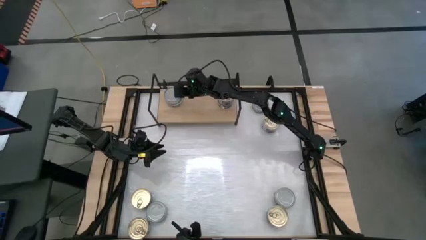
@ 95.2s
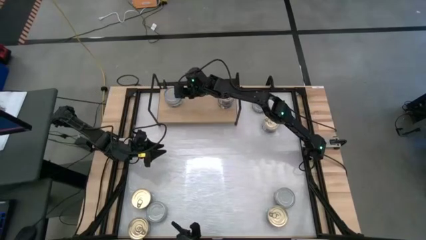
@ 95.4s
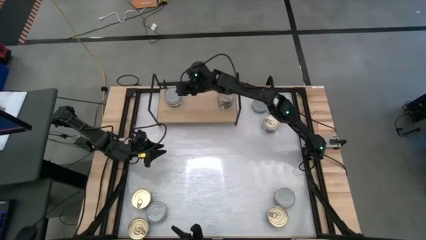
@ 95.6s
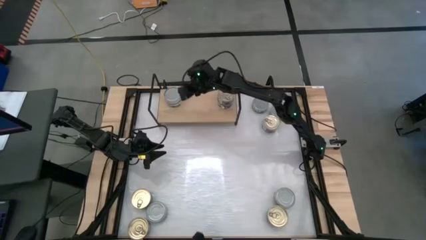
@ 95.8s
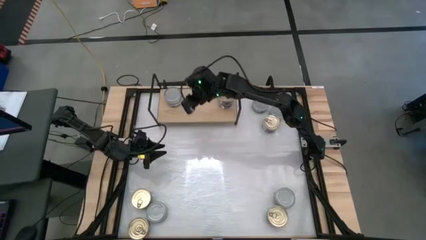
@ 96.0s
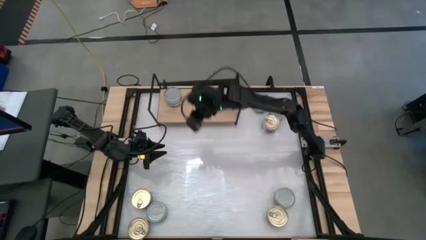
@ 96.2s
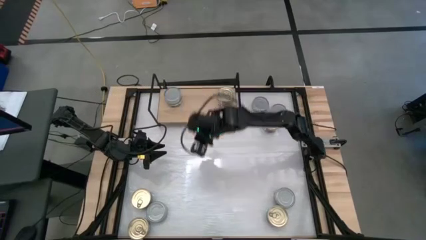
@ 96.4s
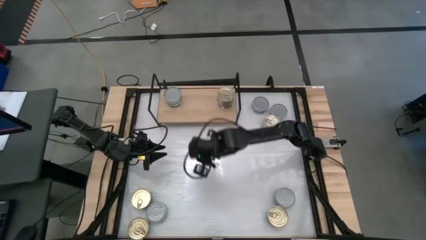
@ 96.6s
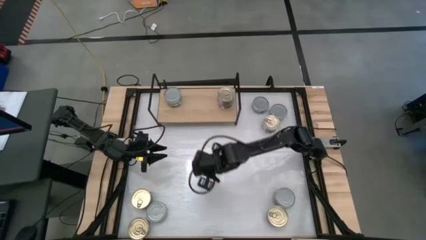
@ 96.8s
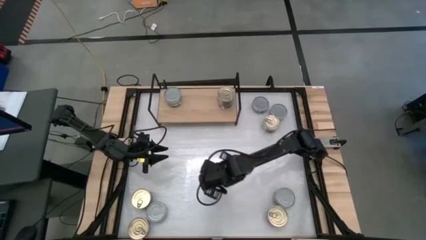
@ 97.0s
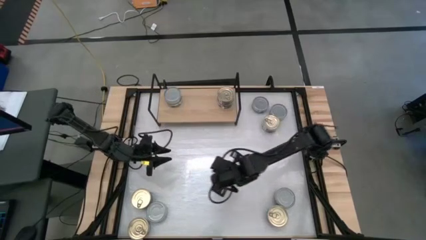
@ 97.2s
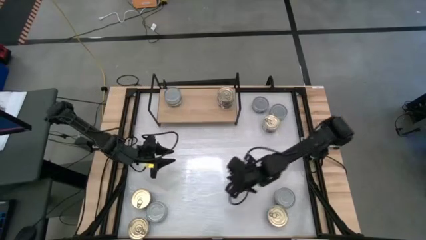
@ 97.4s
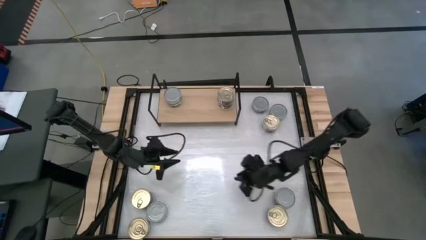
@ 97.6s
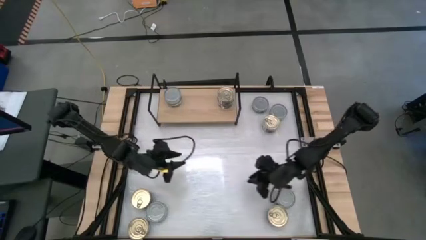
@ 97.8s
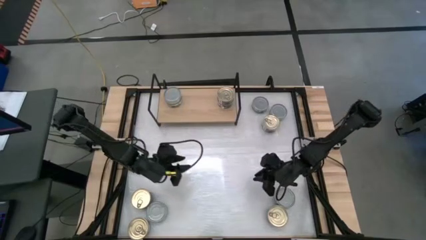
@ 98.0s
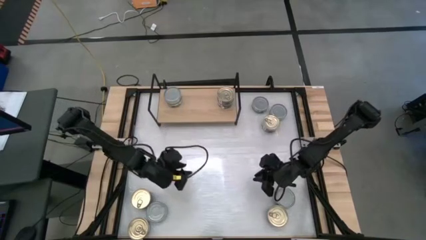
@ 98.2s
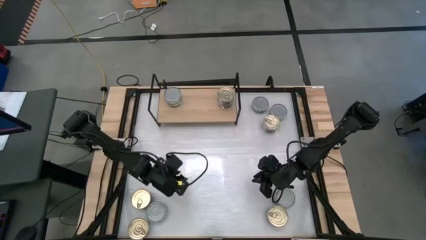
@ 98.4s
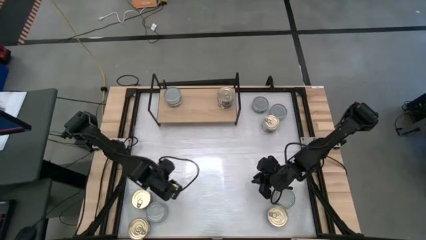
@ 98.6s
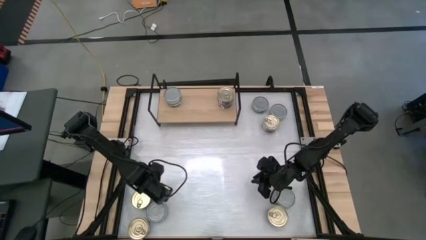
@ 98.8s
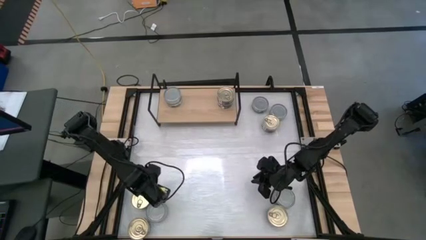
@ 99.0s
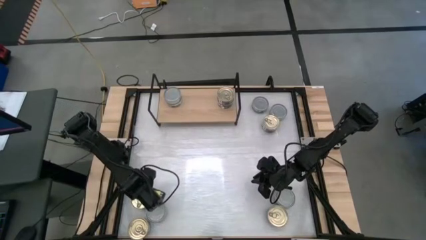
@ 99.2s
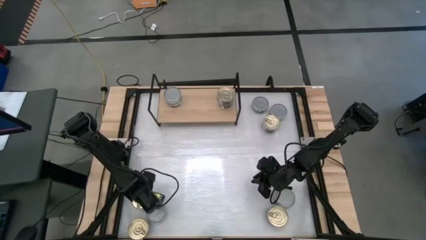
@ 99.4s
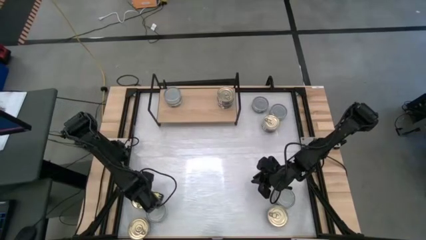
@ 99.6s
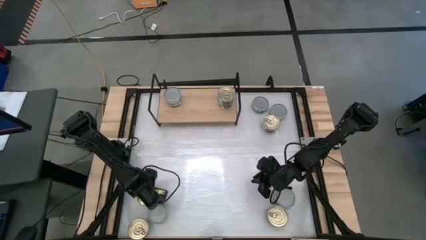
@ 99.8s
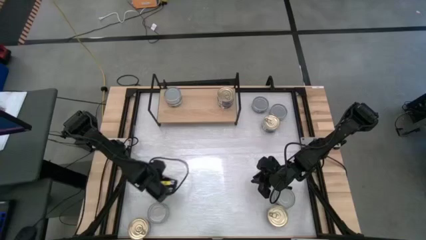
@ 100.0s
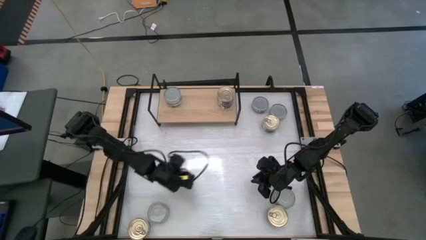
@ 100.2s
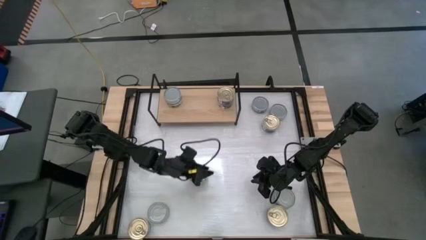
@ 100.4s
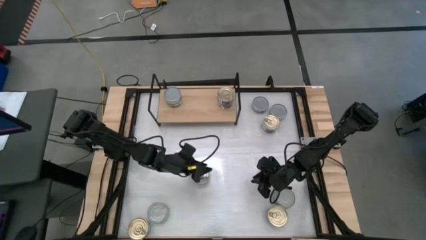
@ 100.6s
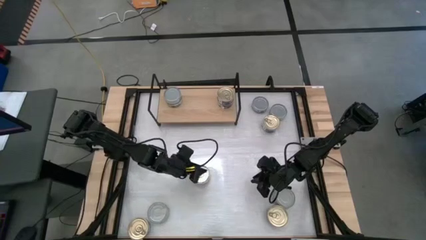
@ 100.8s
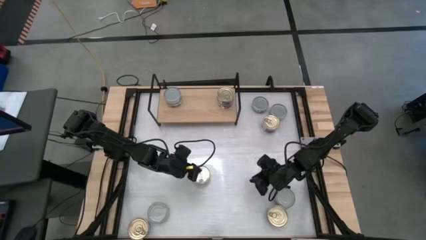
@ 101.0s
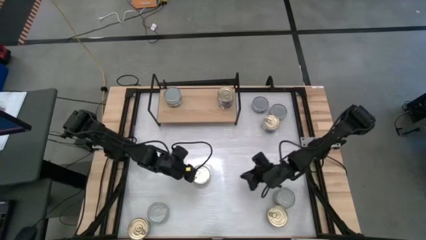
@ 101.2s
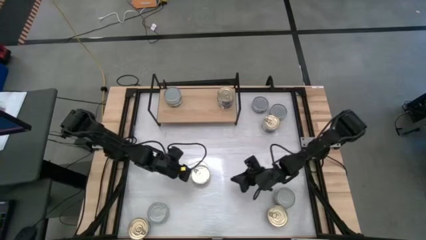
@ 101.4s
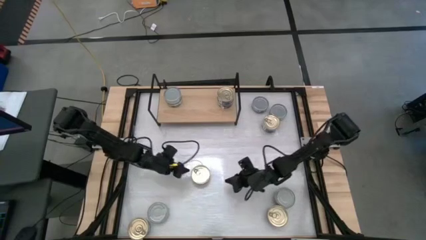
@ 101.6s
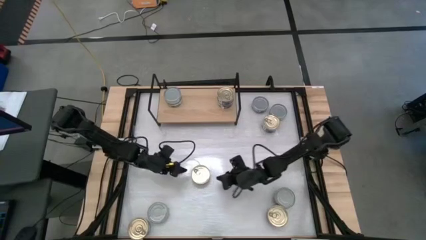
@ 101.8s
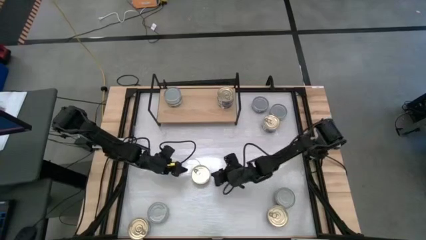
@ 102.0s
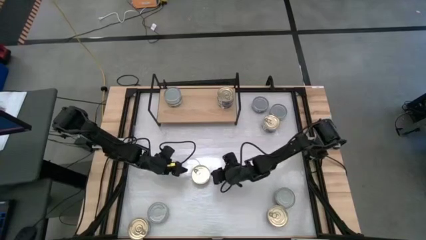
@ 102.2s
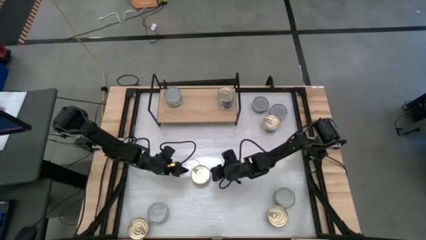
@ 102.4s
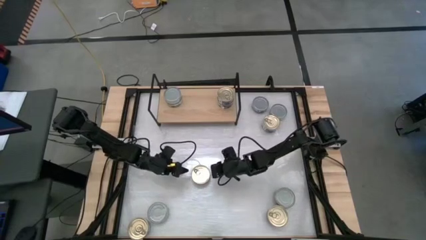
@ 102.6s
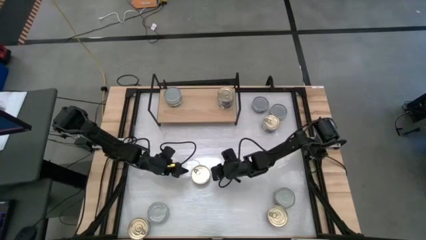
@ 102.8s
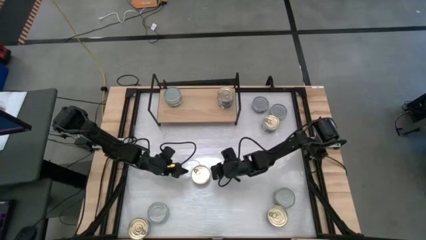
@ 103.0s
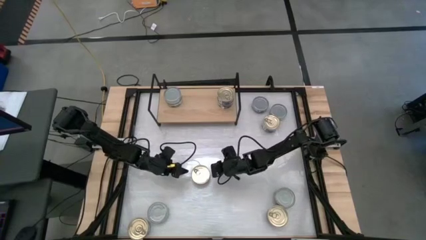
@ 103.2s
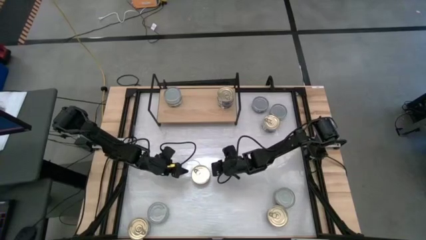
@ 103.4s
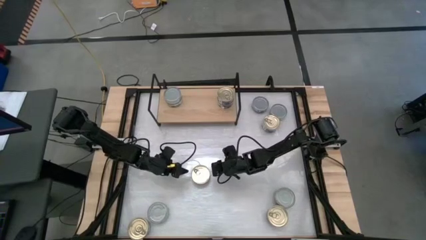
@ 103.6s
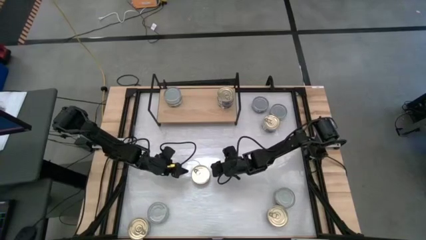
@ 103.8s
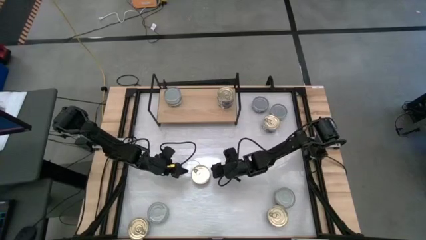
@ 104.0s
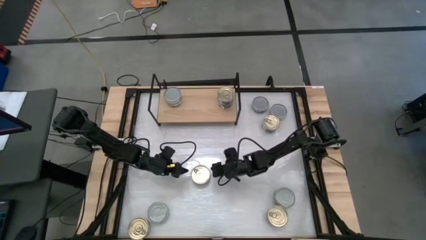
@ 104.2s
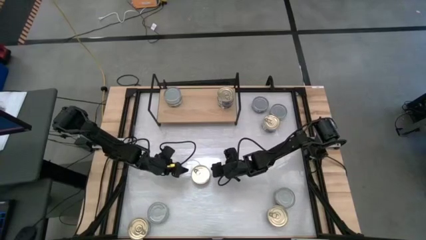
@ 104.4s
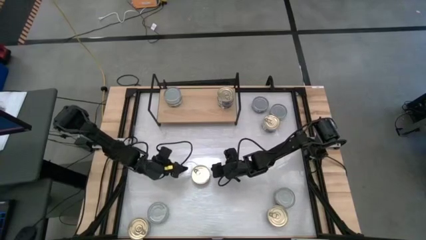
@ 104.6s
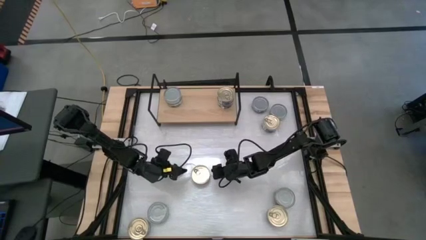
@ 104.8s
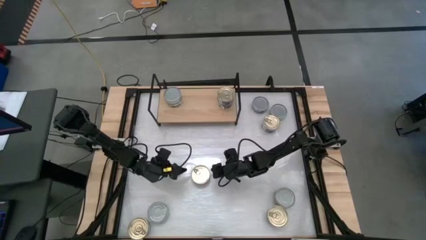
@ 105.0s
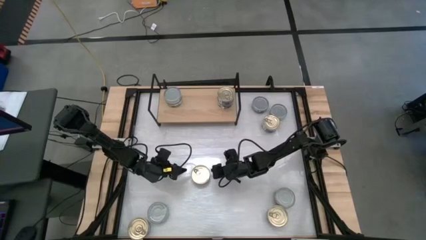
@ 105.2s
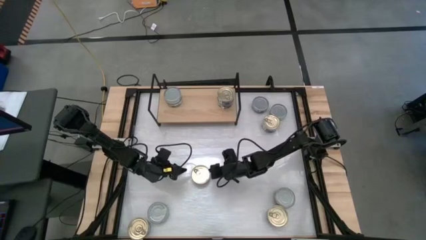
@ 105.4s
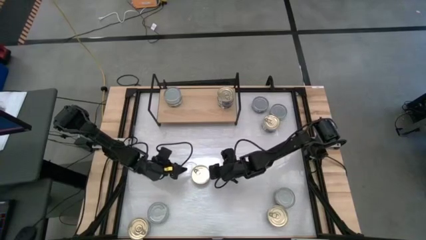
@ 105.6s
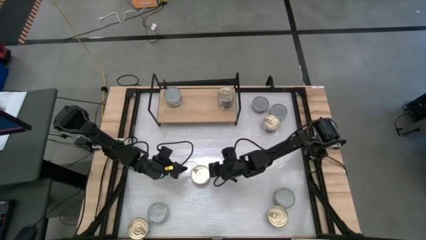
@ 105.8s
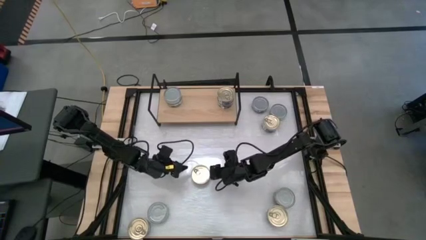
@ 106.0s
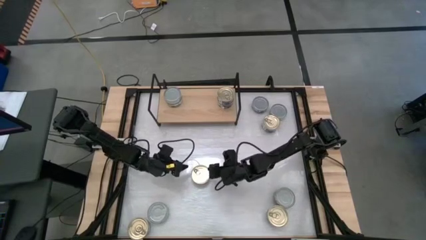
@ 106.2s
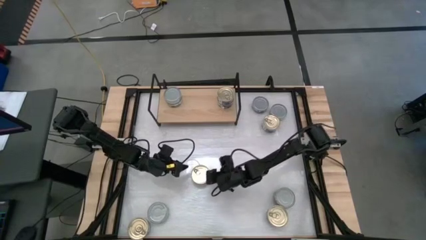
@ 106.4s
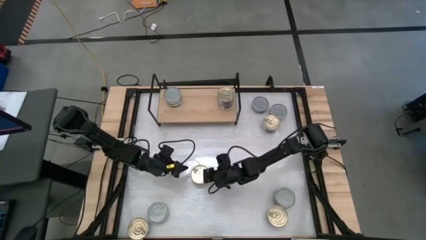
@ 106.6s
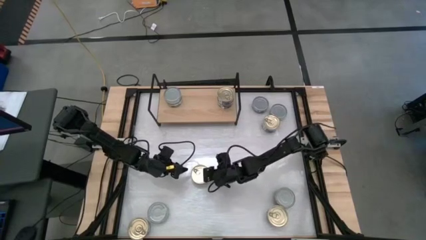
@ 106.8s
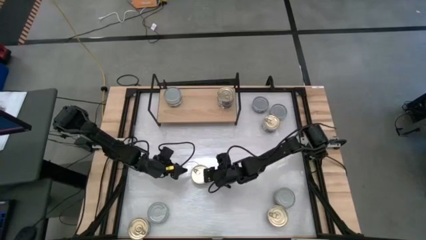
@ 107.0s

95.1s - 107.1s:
Task: Stack canned seafood by type on shelf
Put the blue tuna can on the shelf

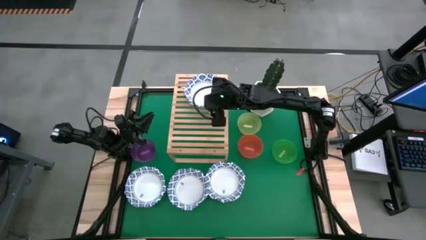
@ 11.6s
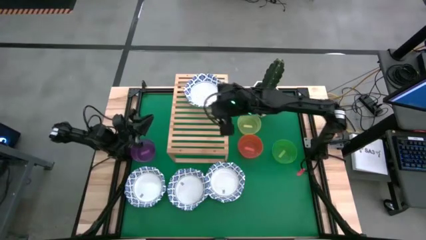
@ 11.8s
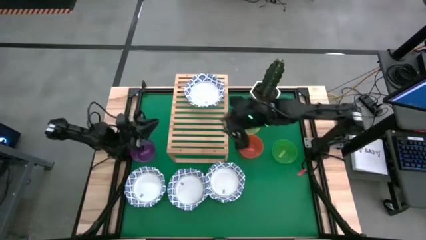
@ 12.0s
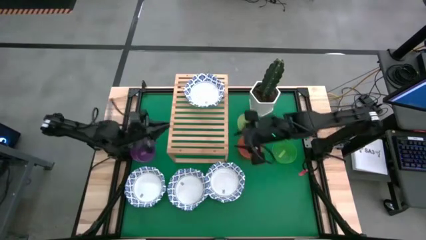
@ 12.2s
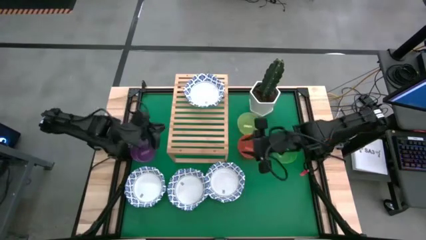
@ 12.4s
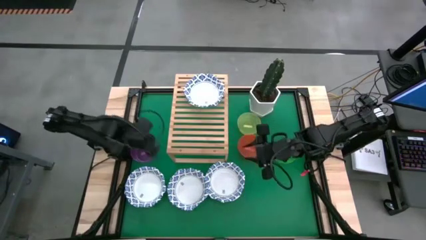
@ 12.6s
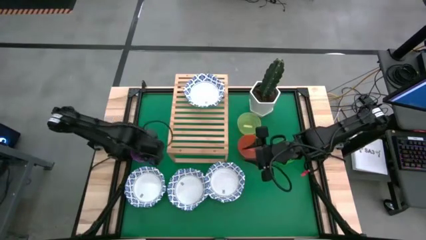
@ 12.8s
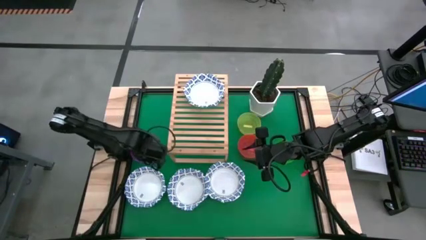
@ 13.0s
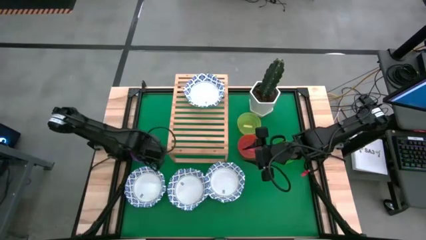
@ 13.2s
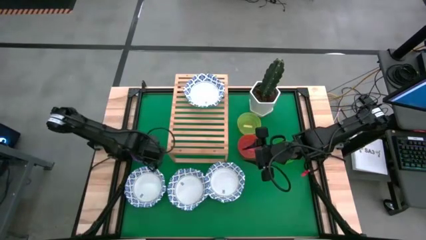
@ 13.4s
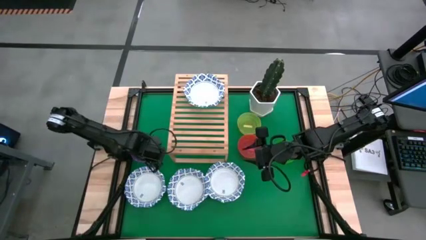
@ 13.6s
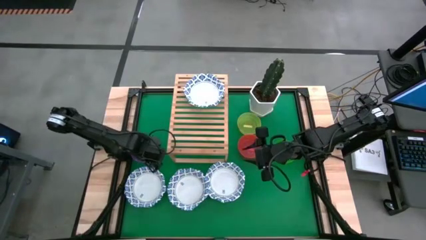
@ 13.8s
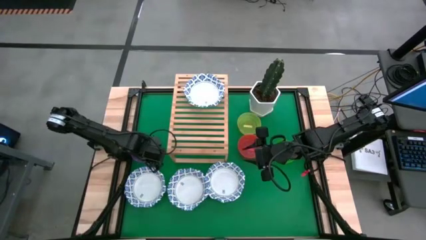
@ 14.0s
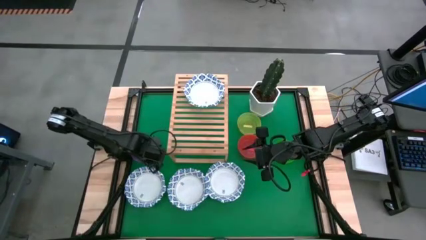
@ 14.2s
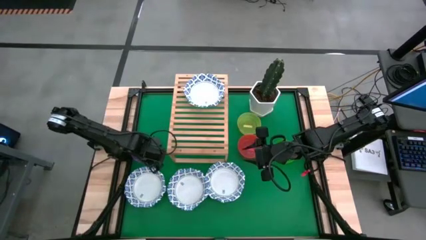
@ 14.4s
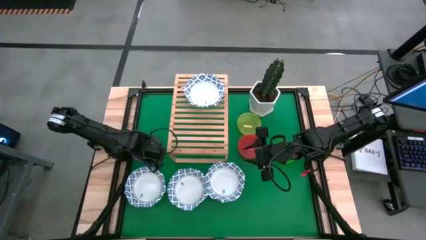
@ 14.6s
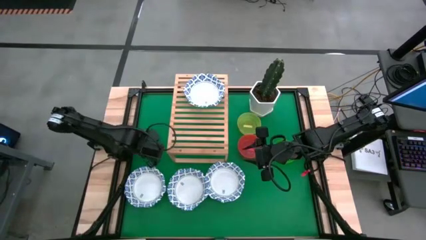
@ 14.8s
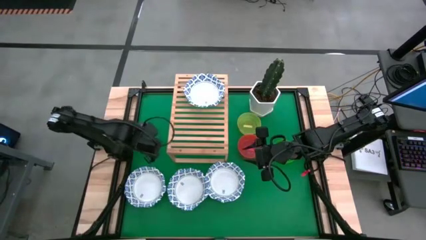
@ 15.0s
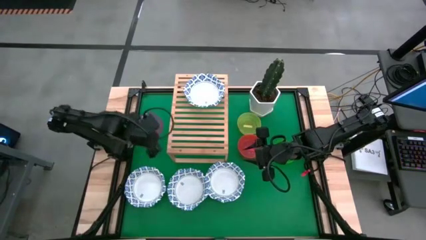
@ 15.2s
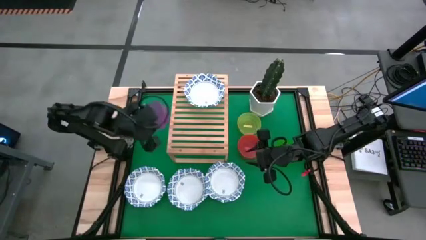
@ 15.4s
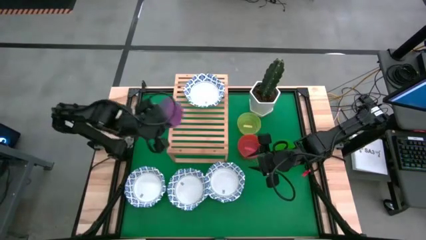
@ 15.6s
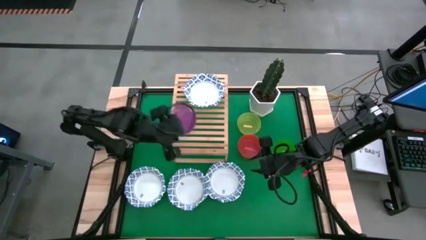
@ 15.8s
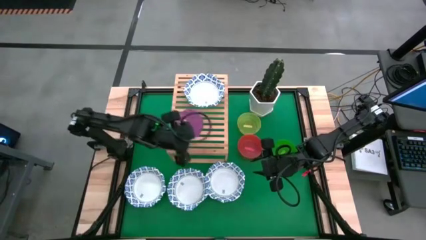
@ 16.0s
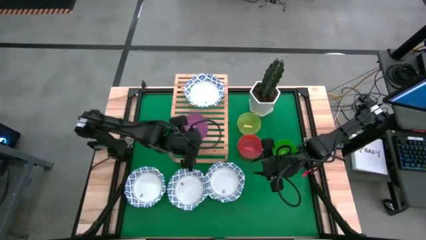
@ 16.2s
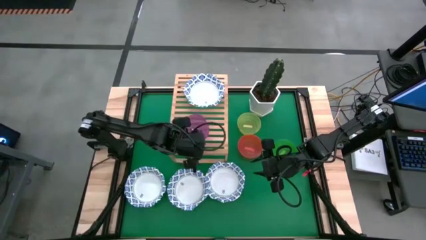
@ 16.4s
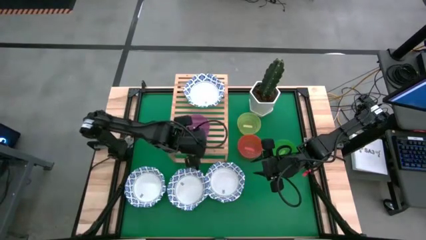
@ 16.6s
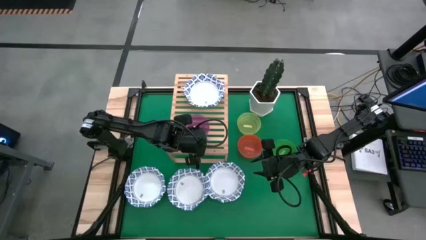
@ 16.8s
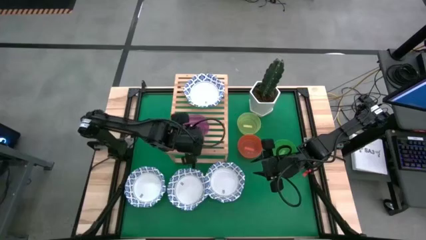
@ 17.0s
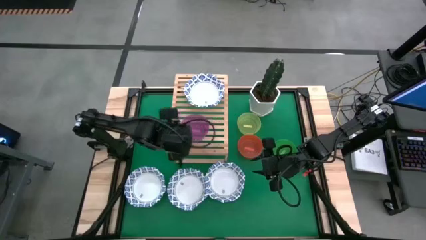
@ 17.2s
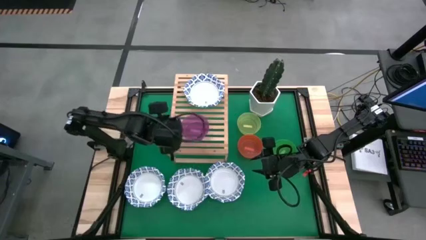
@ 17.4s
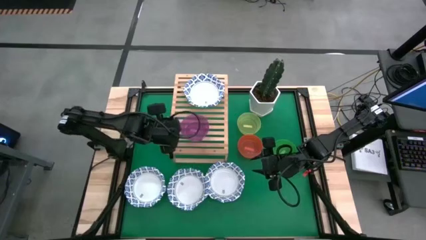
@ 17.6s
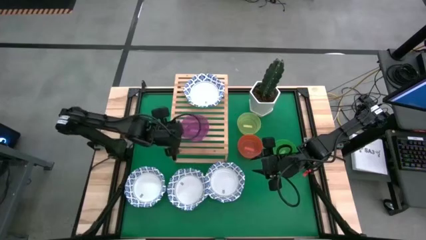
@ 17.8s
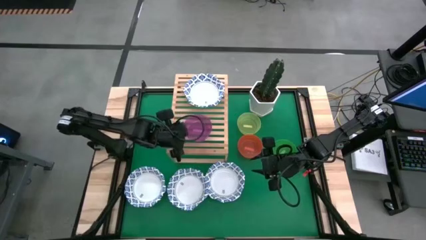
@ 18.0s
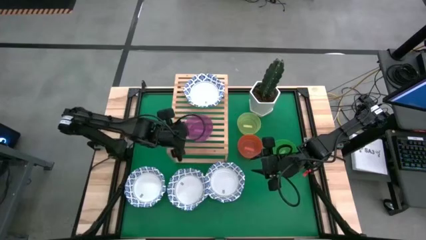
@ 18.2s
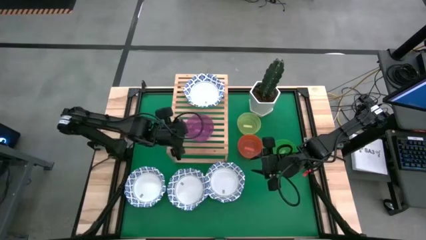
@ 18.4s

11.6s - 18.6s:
Task: Place and stack bowls onto a shelf
Put the purple bowl on the shelf
